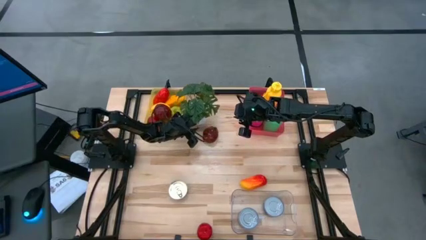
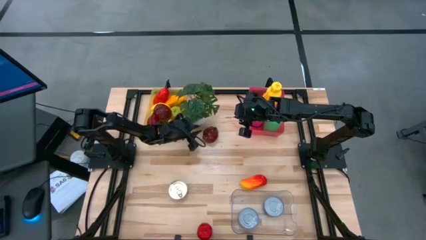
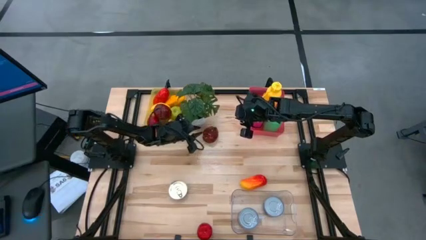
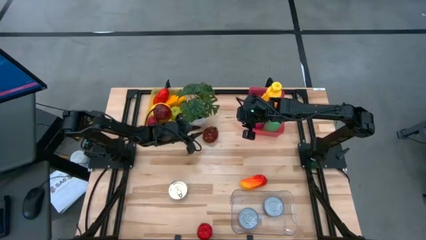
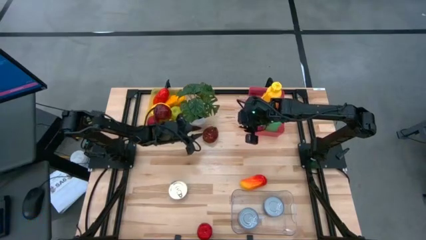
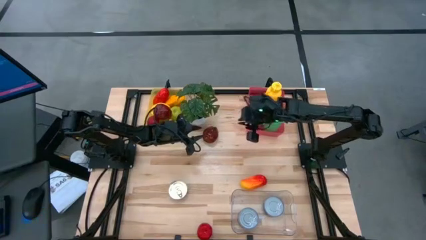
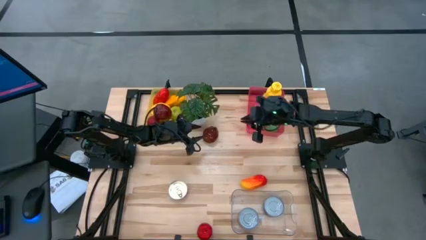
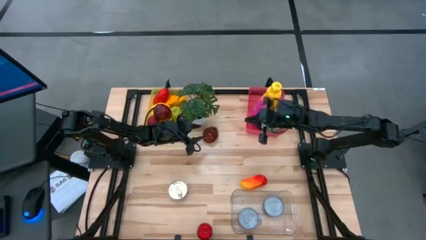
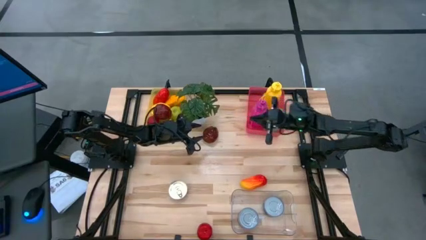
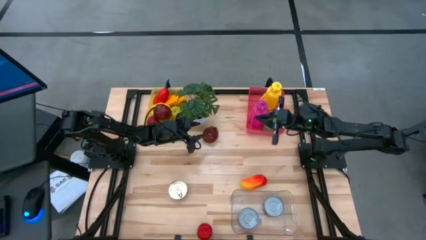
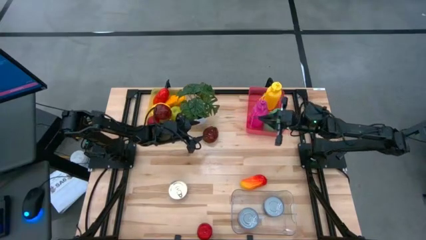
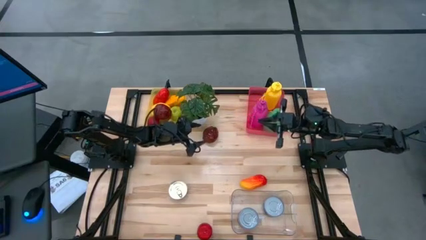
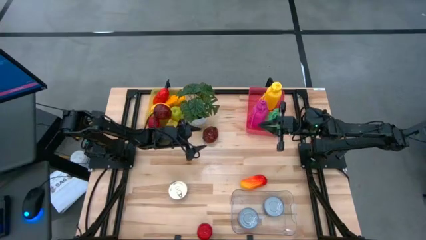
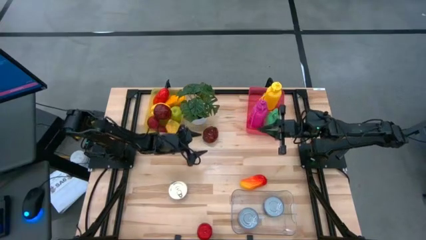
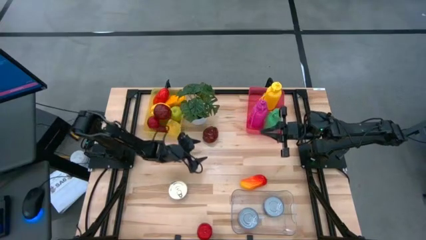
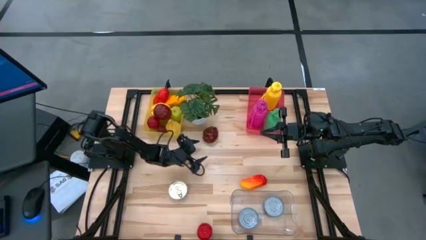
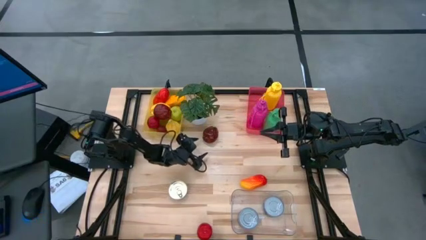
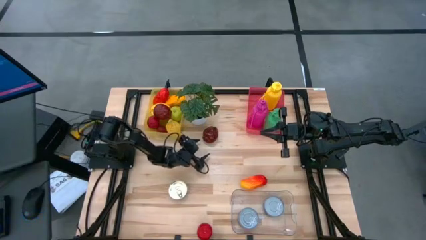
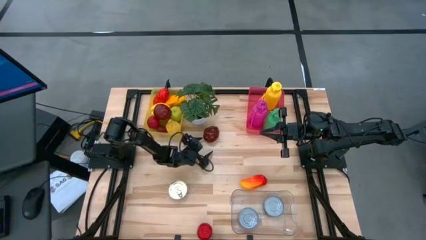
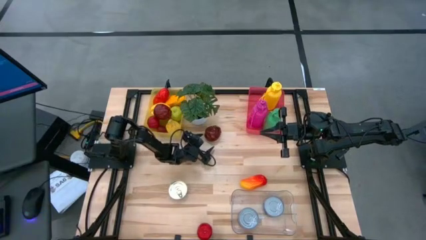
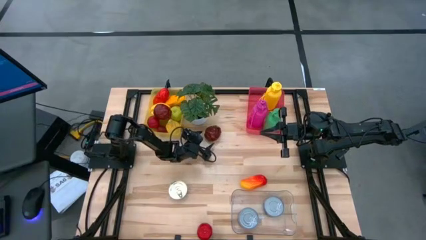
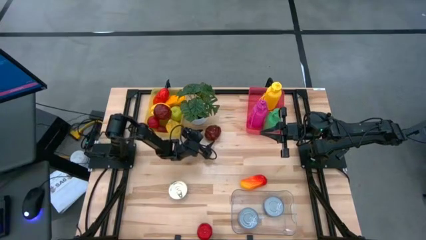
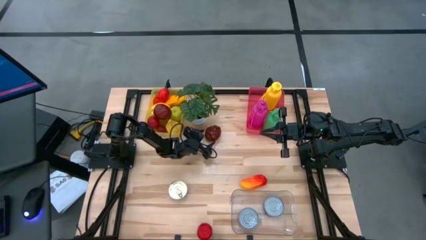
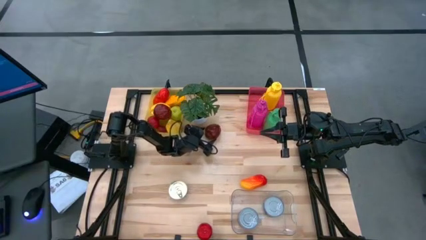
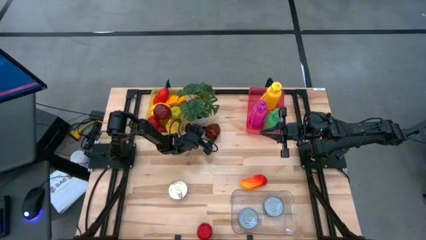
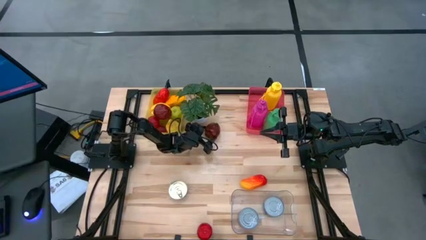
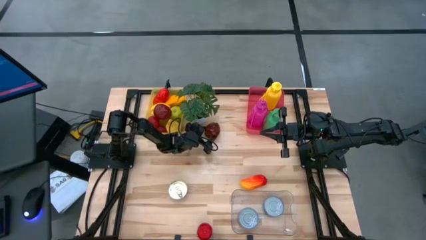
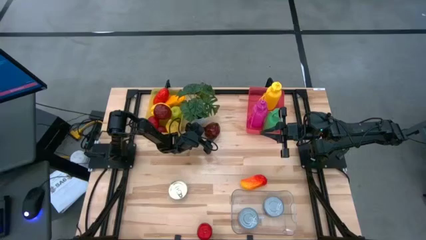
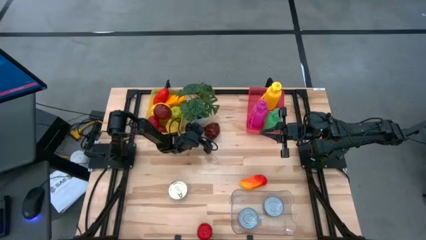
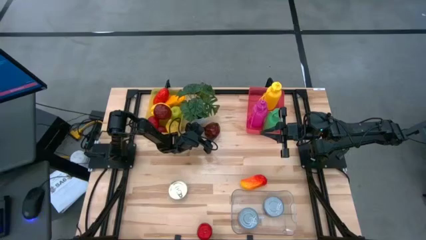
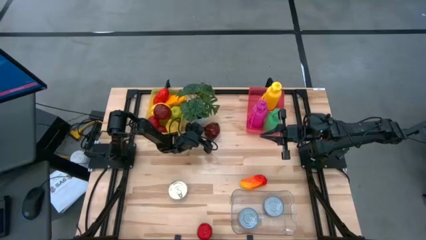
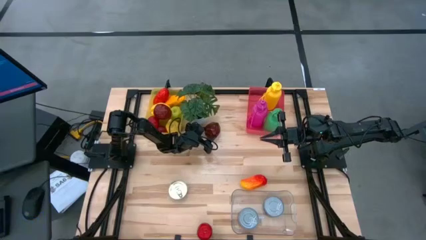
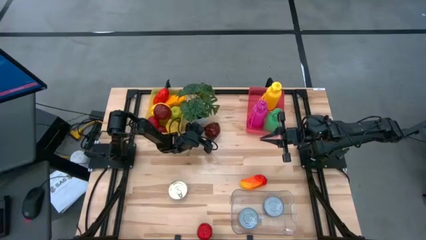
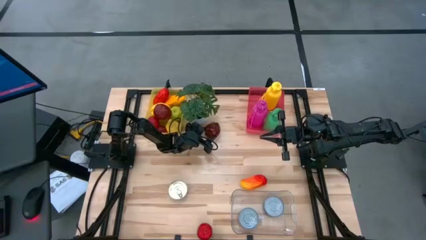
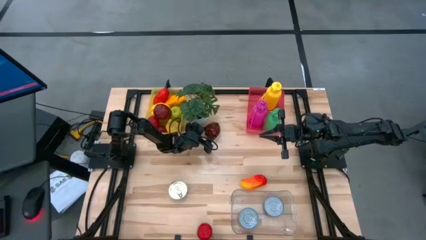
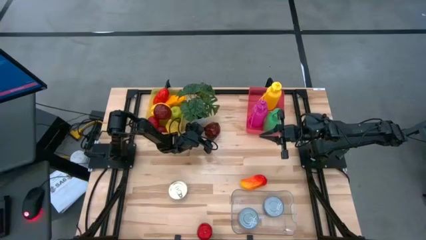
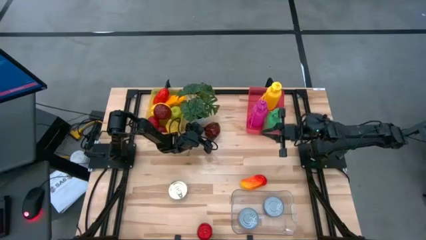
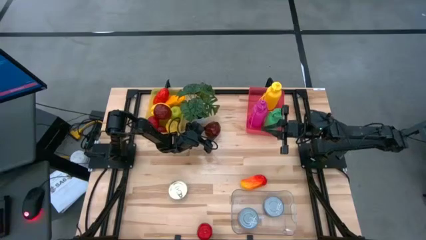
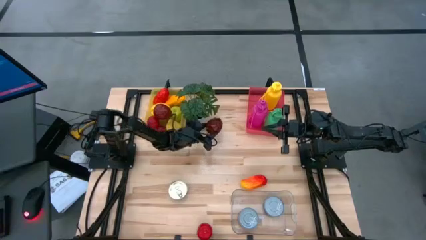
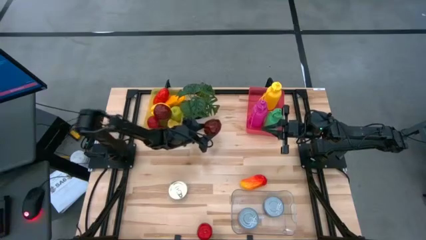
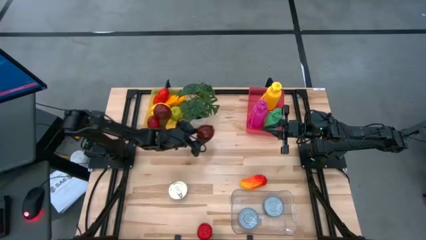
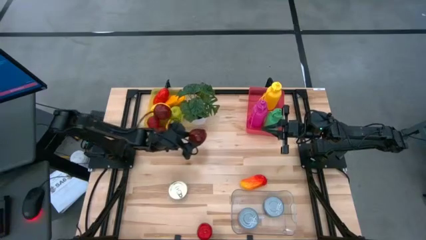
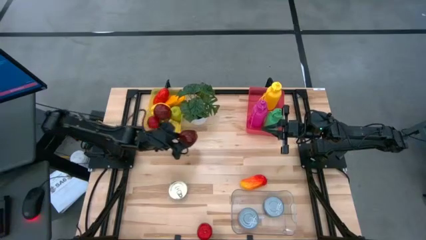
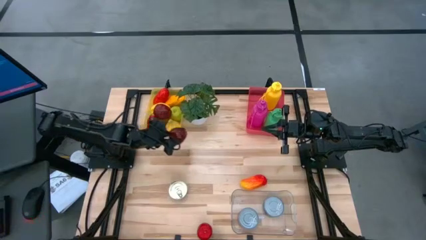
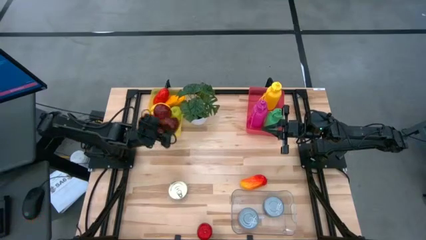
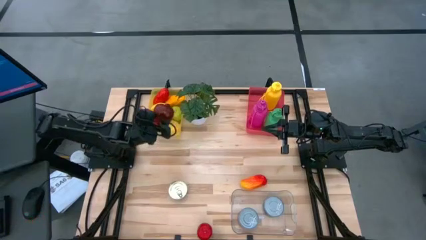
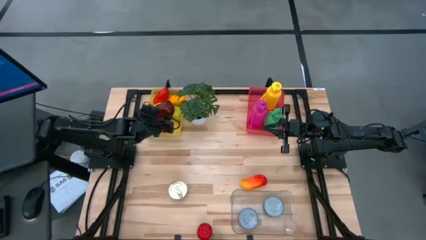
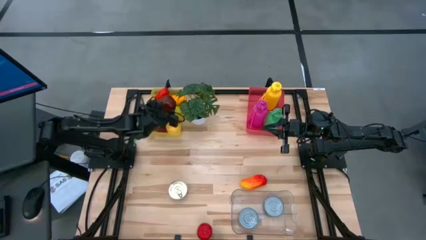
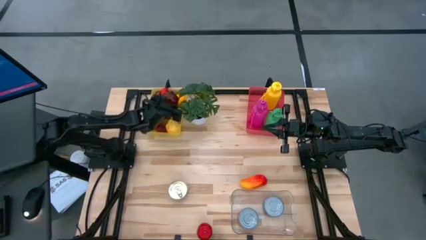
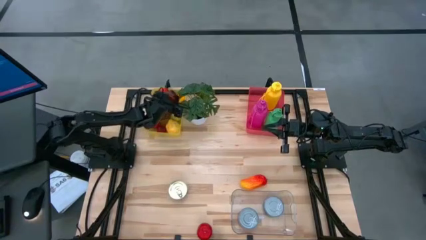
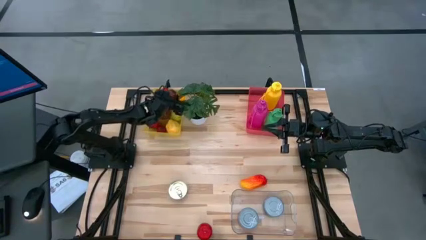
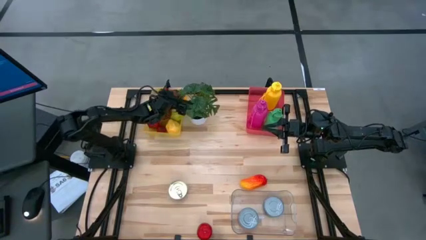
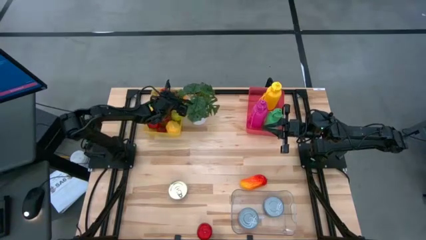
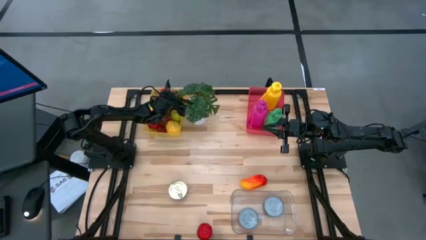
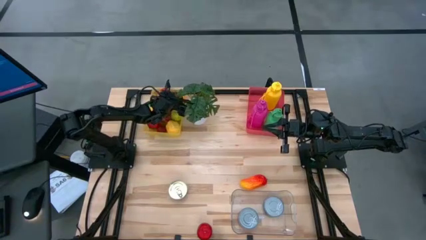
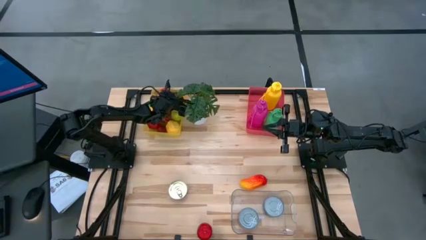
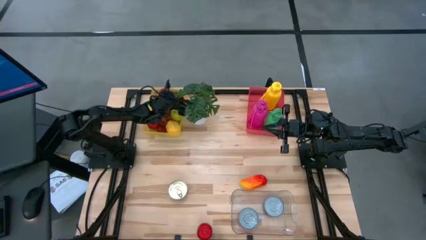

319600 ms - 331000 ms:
Task: Pick & Place Food Item
Put the dark red apple into the yellow bin

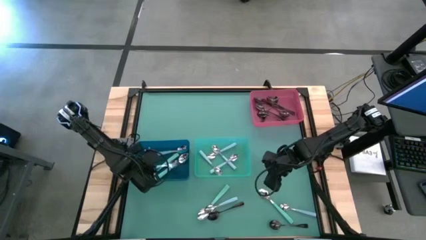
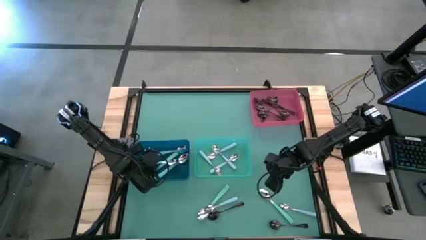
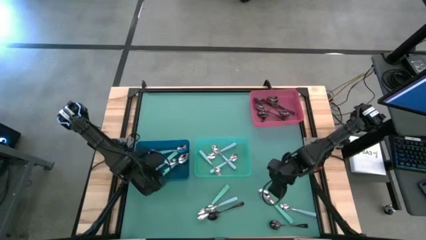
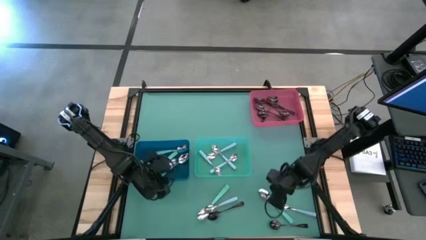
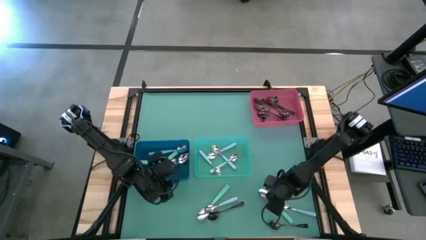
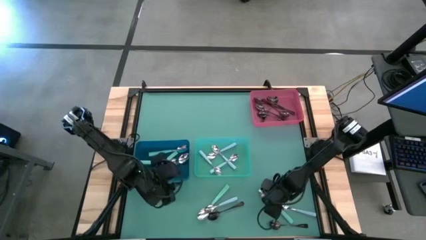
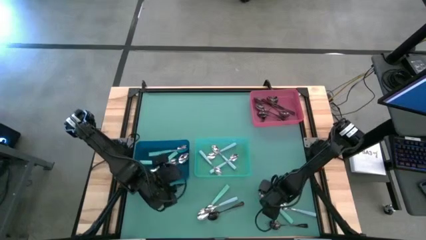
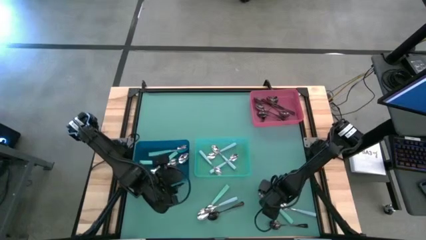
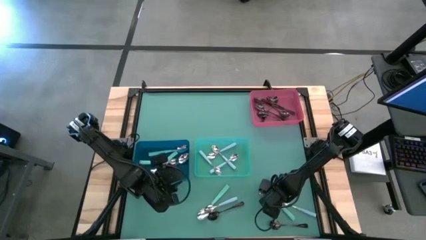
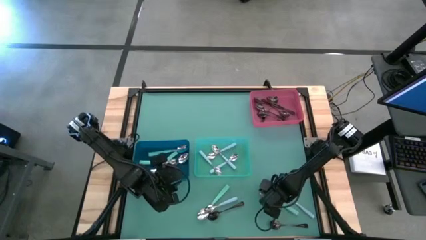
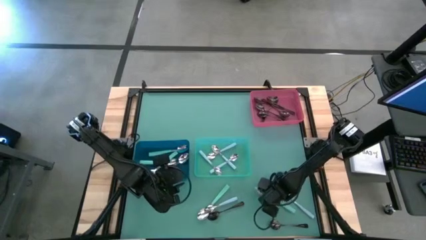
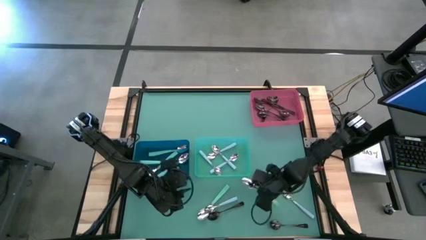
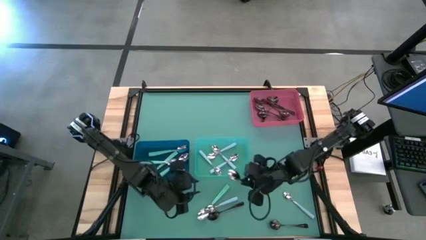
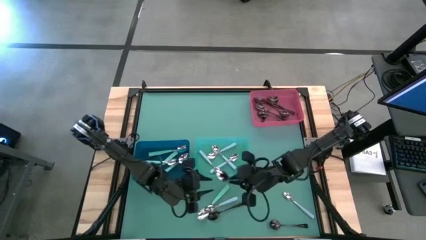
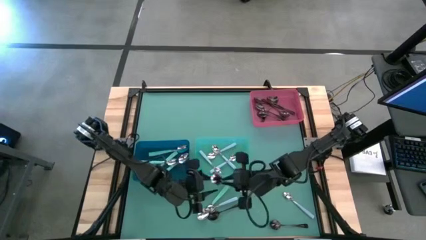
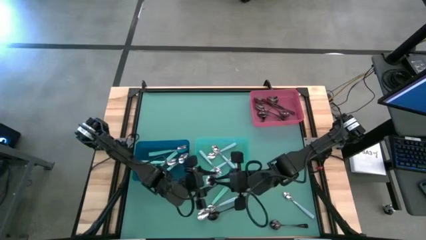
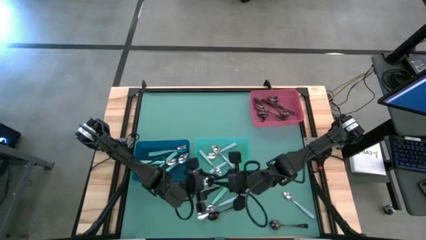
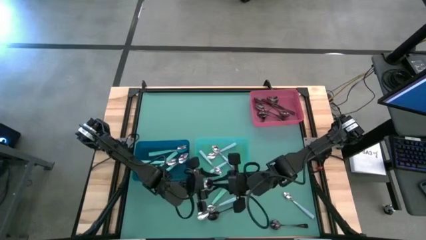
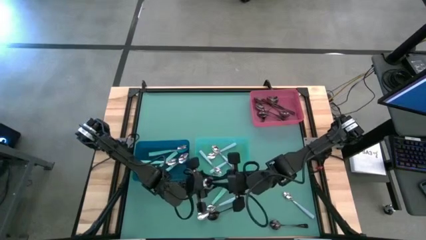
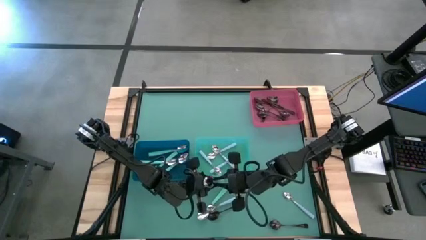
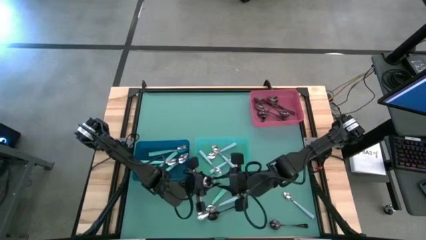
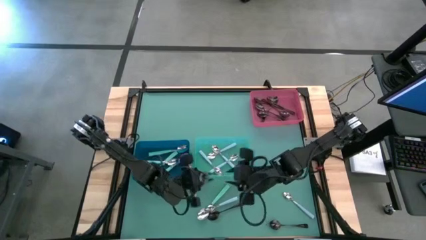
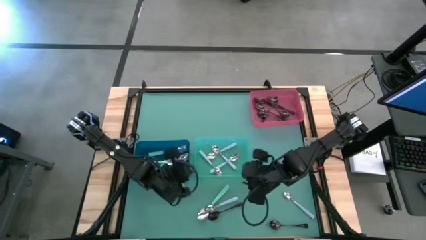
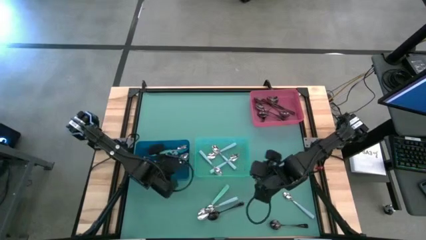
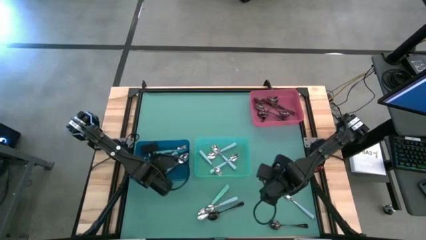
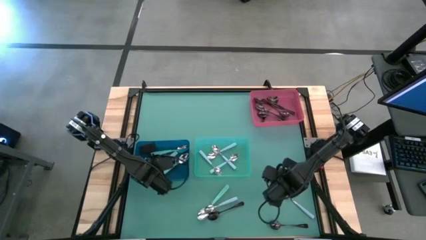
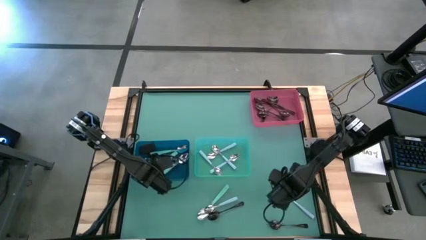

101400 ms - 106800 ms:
Task: Sort silverware by color (type)
Put the green spoon into the blue bin
